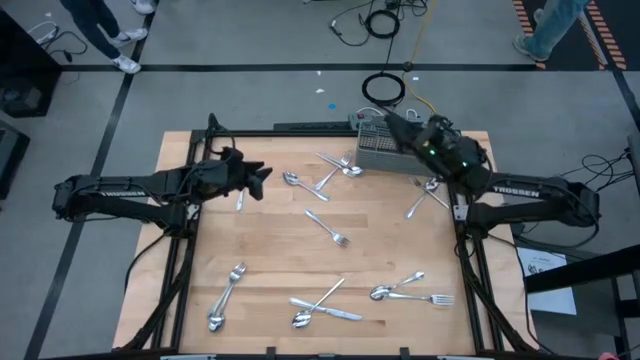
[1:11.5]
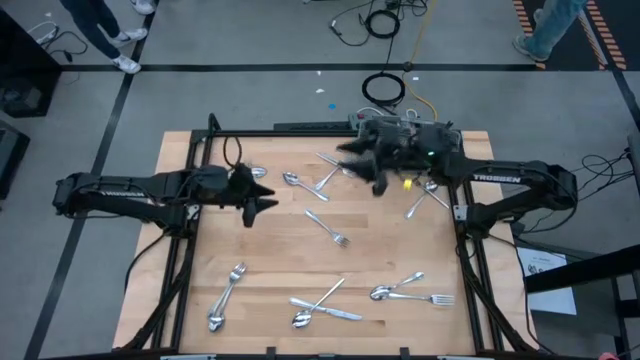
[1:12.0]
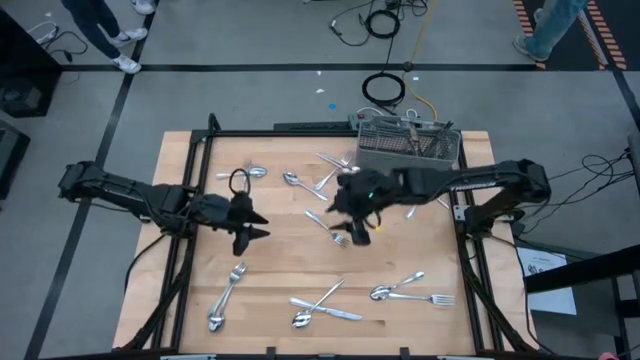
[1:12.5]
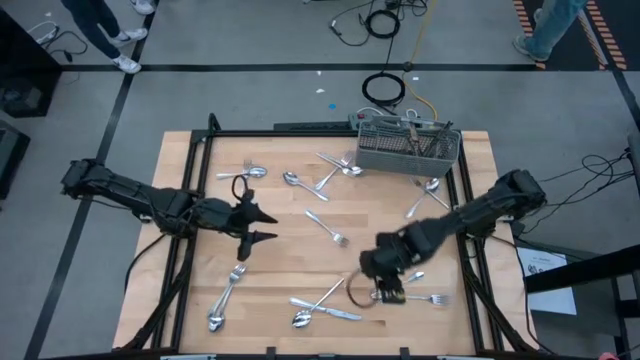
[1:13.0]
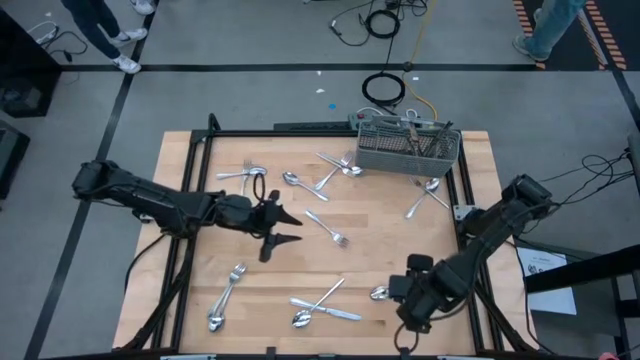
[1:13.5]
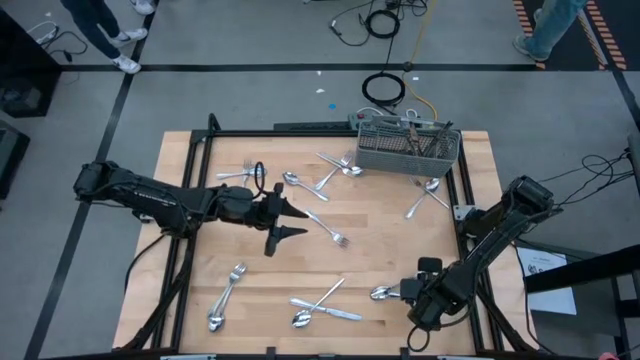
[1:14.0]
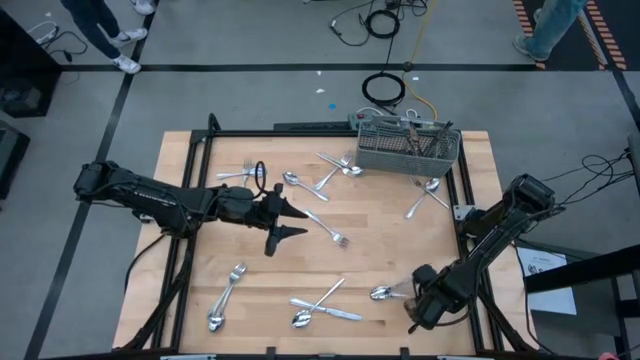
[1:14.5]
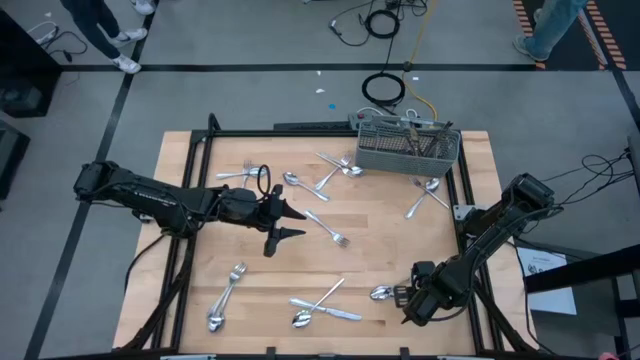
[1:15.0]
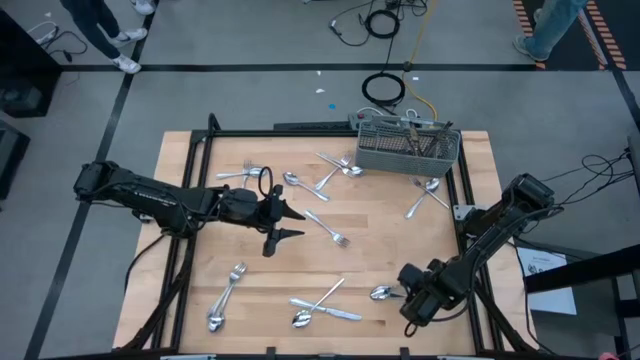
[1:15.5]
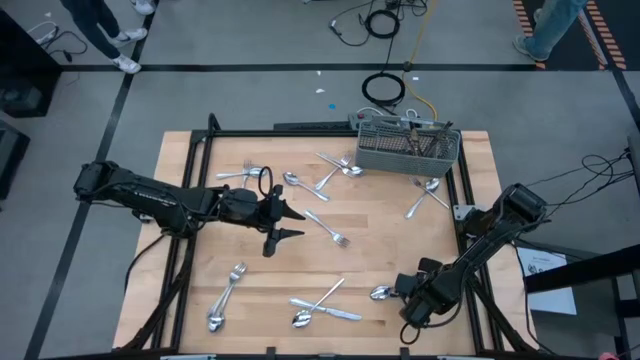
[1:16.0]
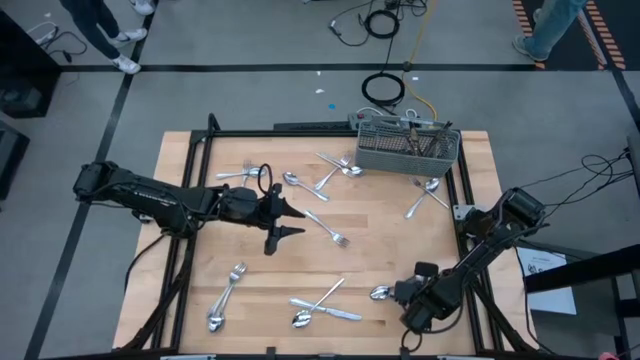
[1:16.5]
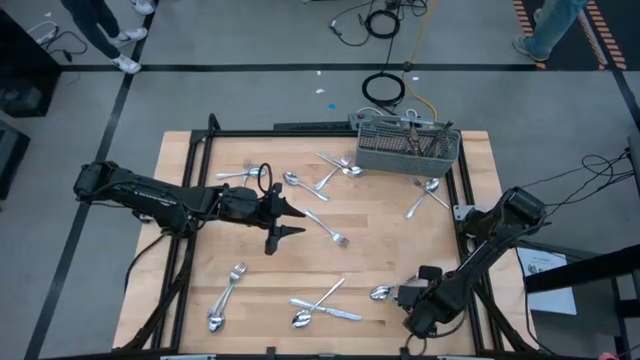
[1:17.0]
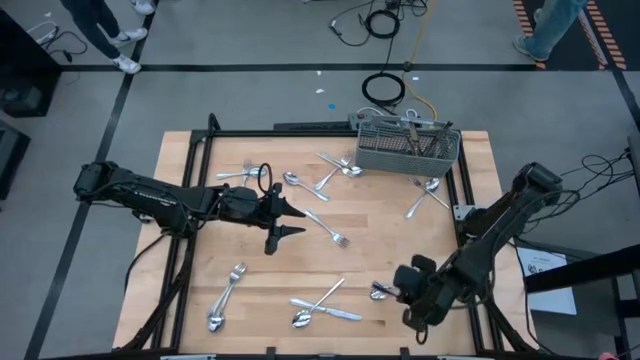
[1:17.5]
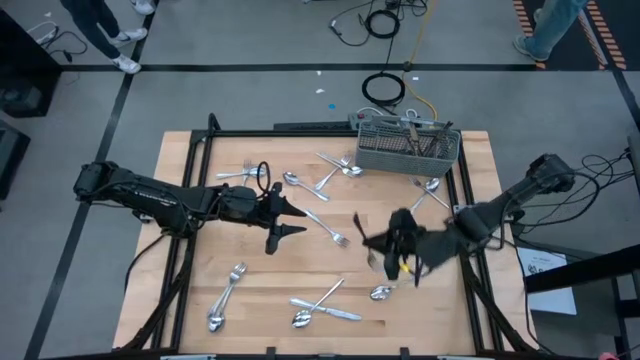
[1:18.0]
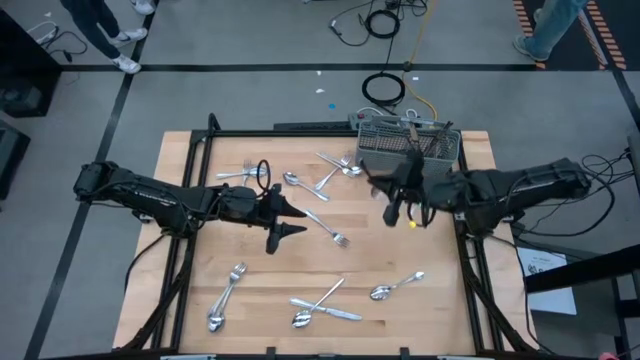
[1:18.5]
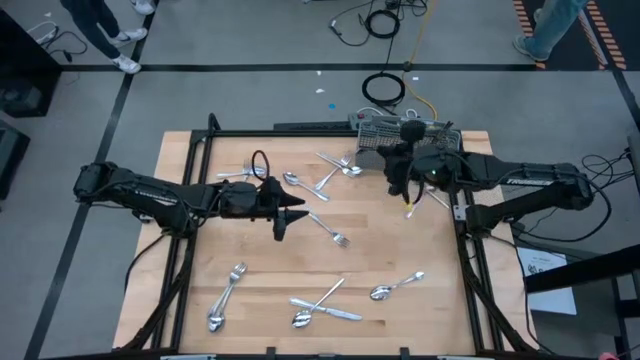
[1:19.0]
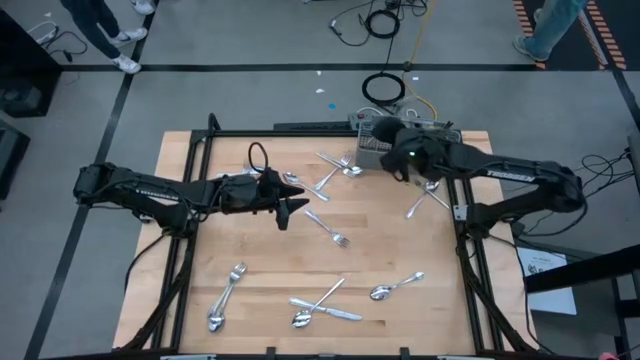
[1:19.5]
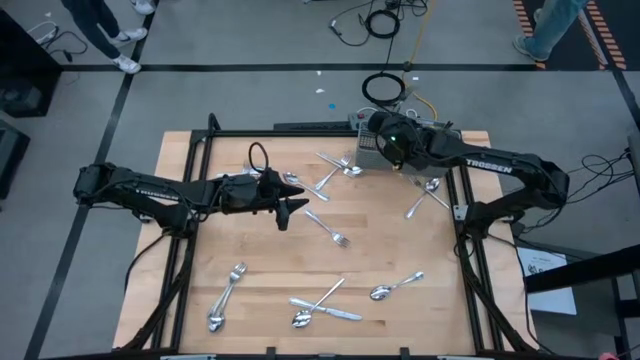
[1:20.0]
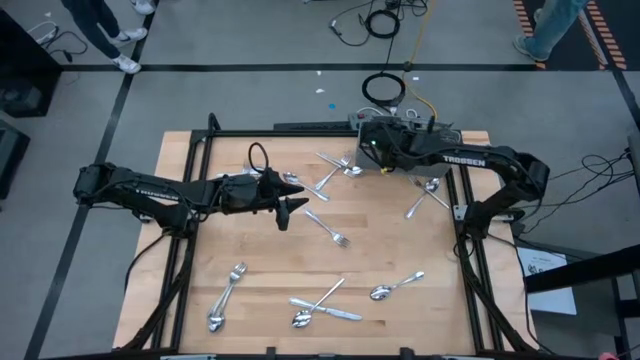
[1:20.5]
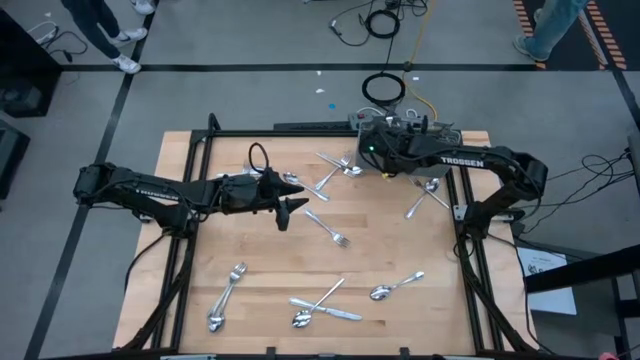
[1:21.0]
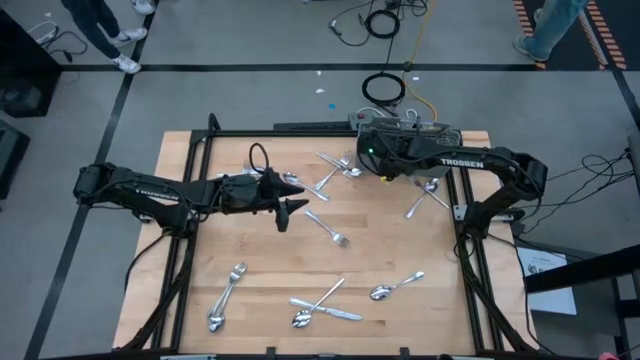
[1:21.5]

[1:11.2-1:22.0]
Task: Sort silverware
Put the silver fork into the gray utensil holder

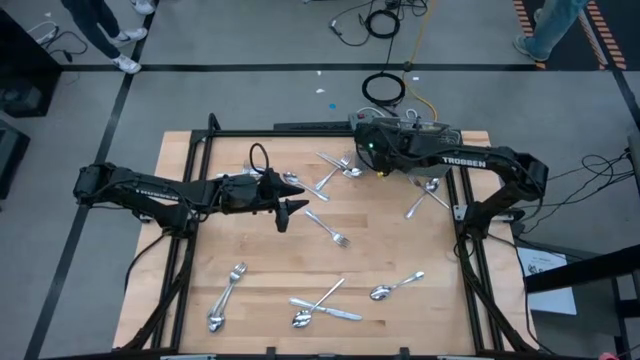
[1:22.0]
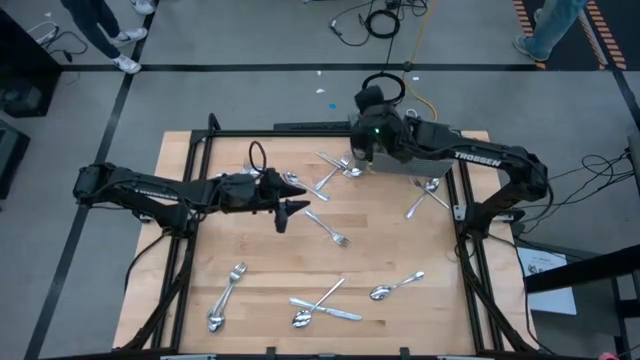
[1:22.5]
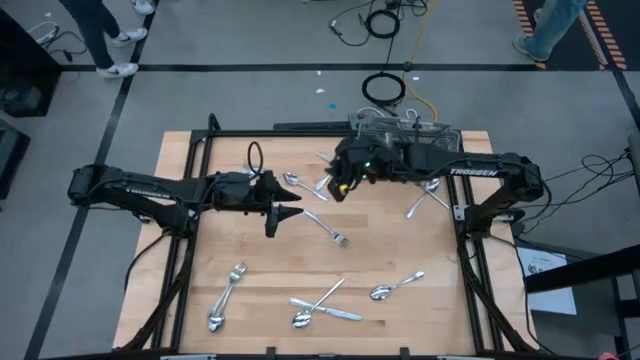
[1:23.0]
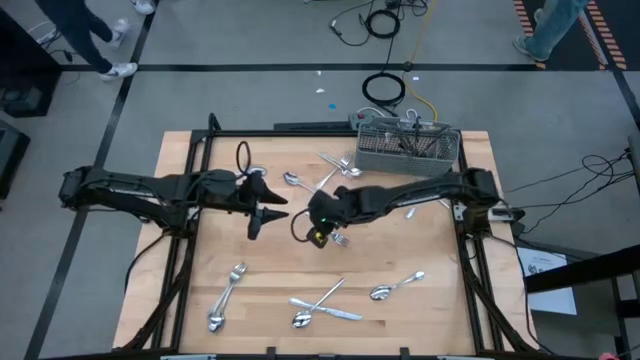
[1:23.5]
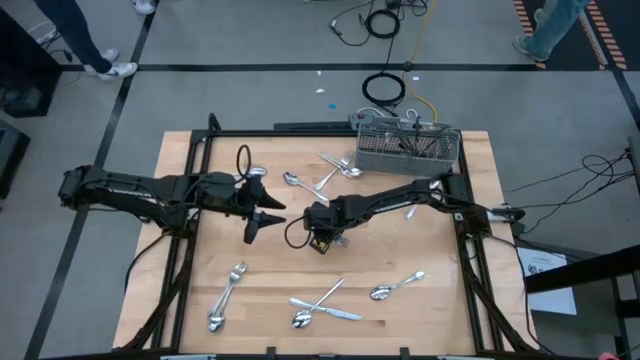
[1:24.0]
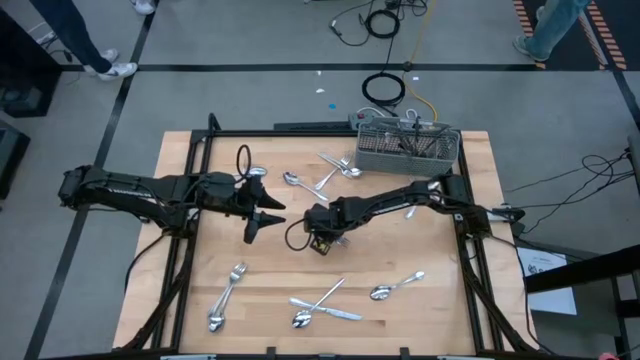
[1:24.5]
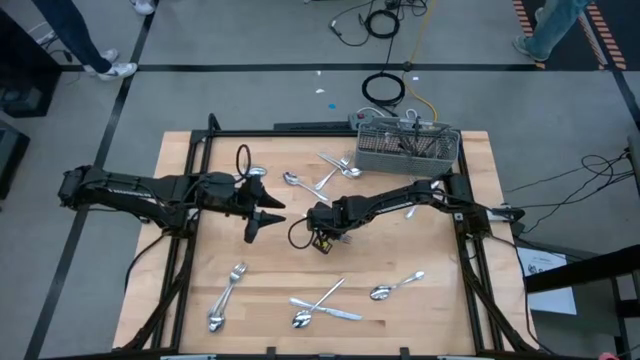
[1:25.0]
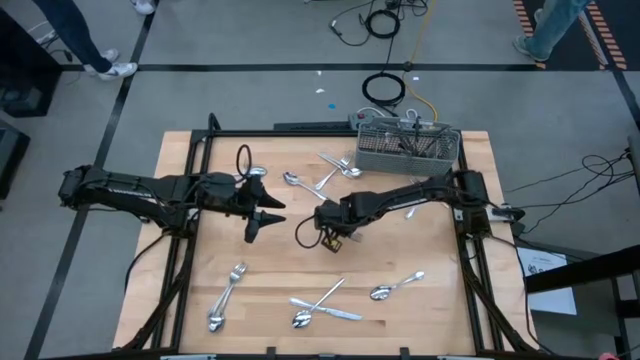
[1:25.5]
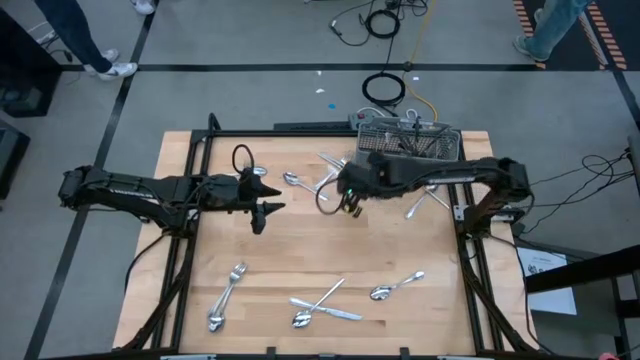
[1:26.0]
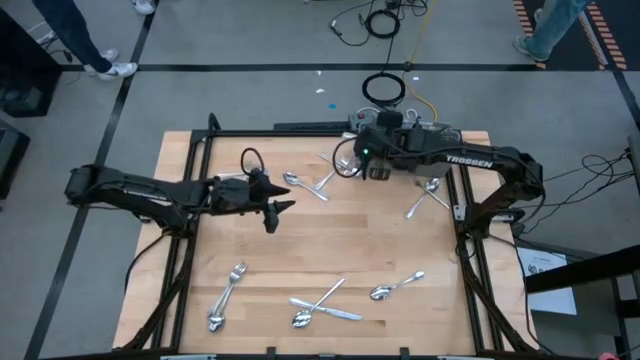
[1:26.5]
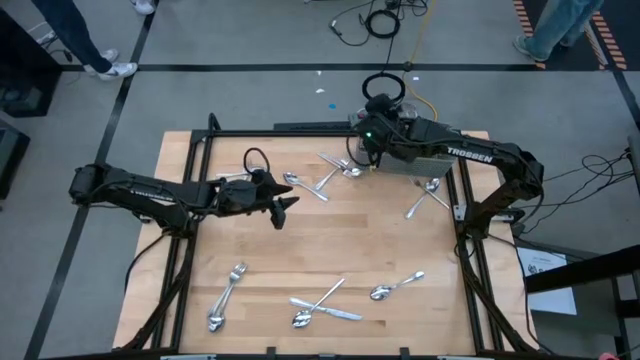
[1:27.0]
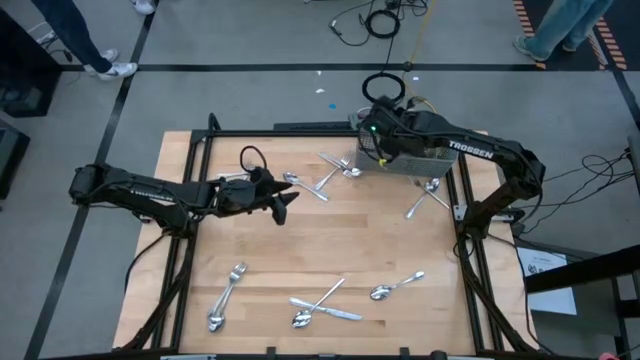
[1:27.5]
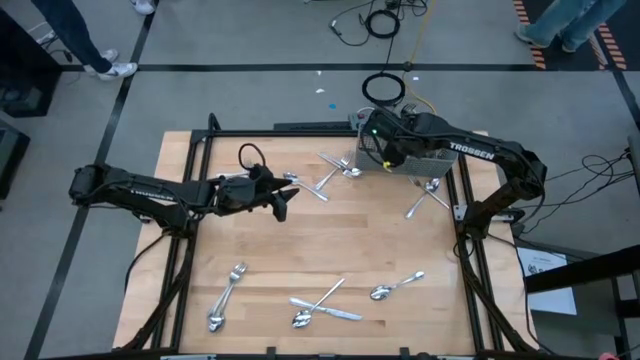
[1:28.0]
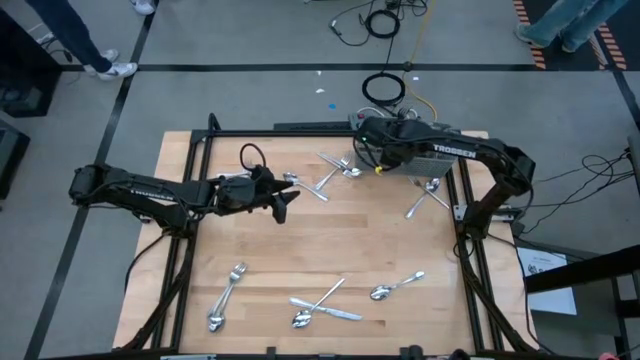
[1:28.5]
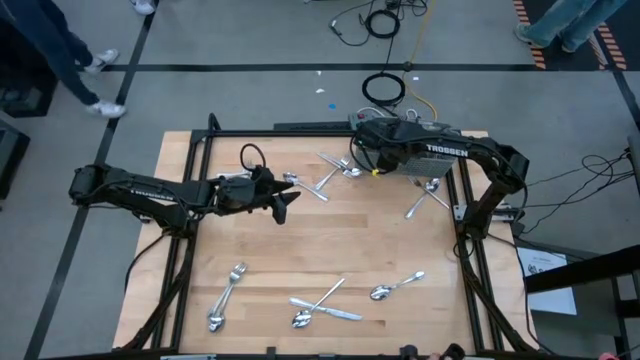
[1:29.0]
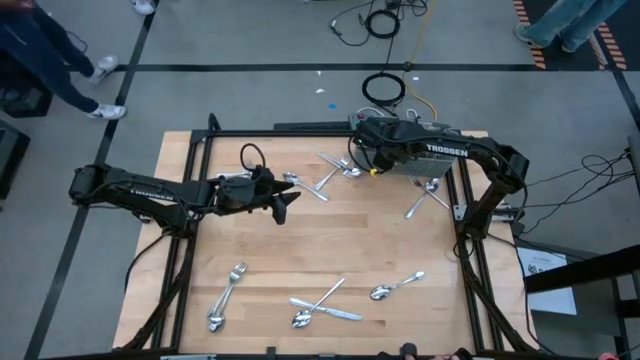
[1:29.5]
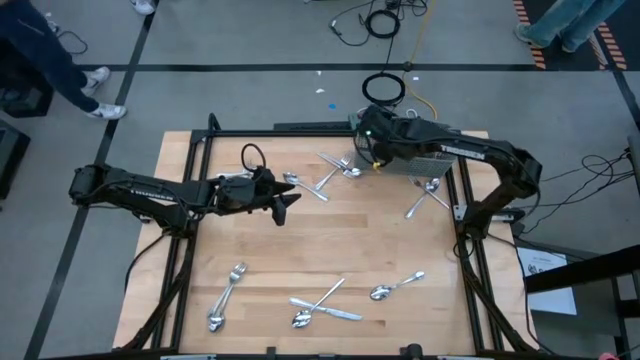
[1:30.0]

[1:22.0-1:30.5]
Put the silver fork into the gray utensil holder

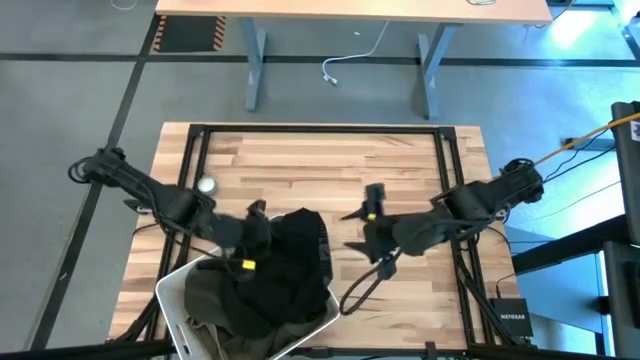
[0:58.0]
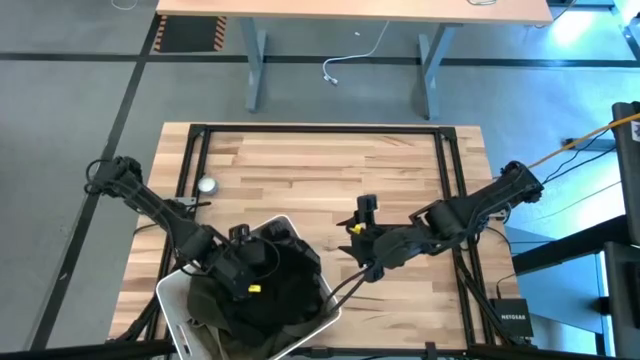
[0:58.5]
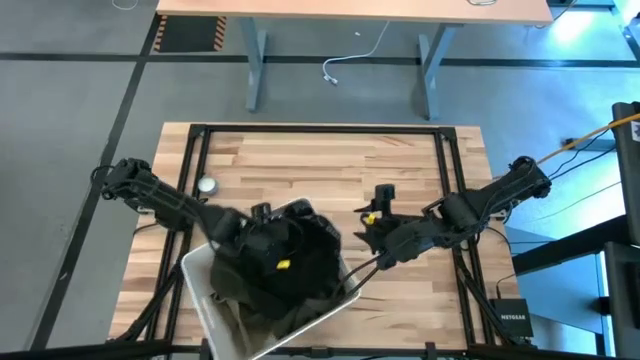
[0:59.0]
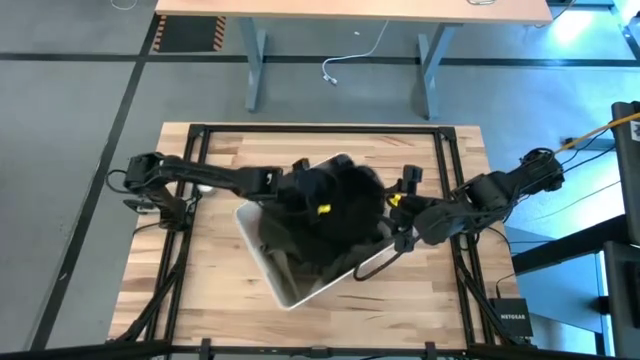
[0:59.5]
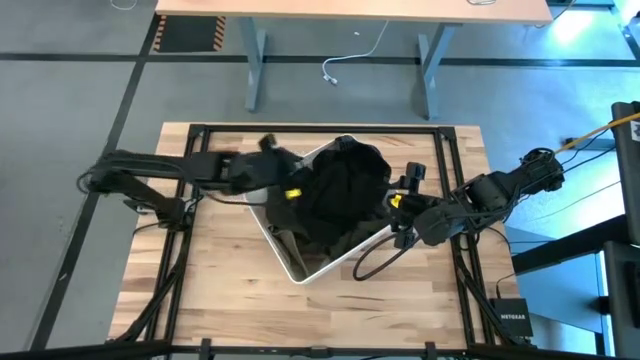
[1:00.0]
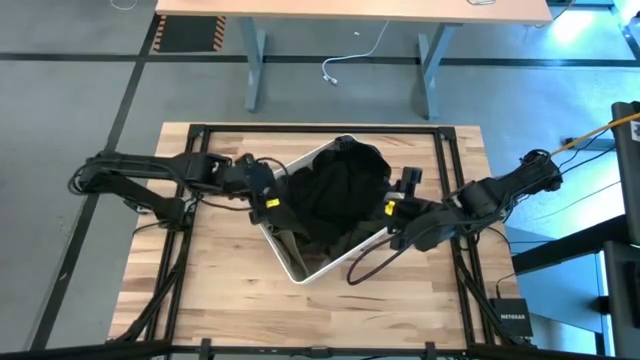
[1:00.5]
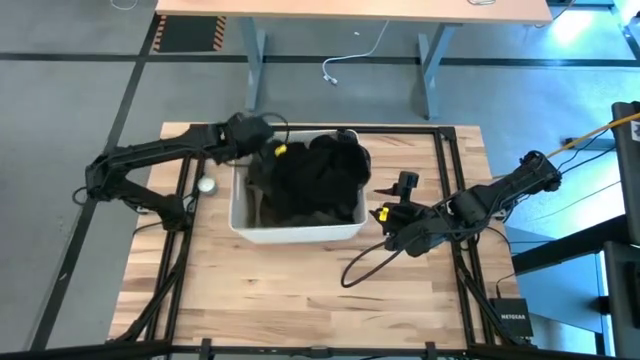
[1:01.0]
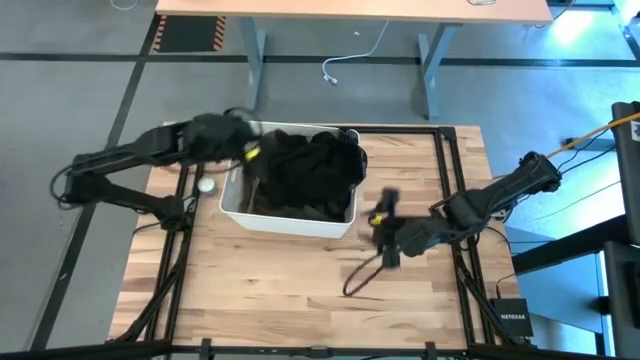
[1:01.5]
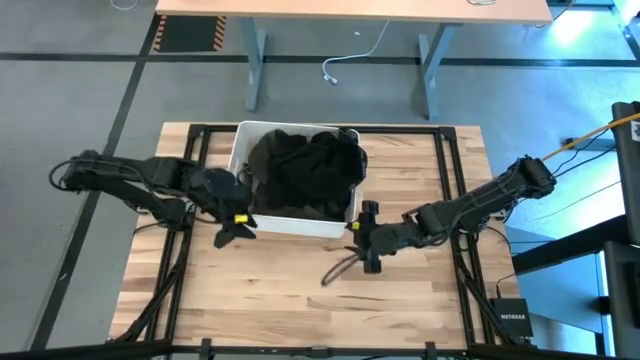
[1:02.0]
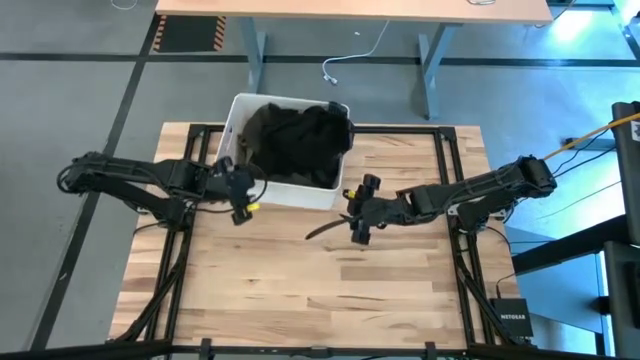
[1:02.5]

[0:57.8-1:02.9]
Task: Sort clothes
Move the white bin to the top of the table
